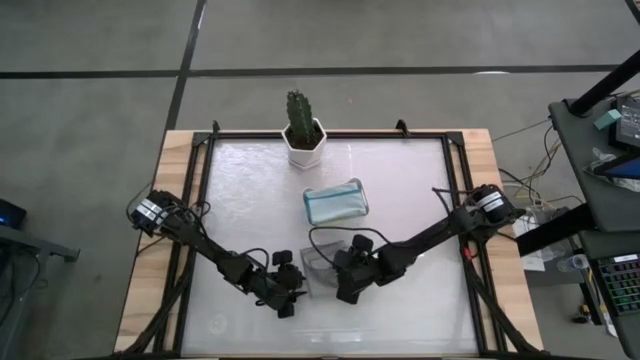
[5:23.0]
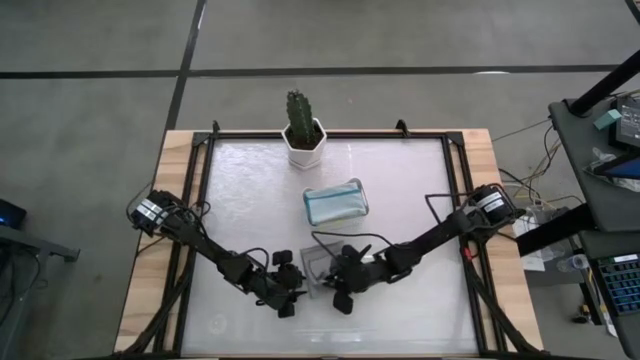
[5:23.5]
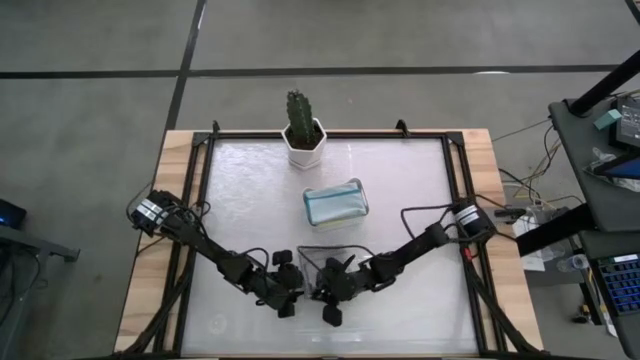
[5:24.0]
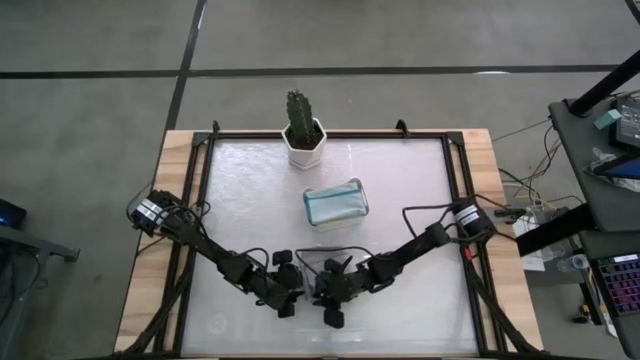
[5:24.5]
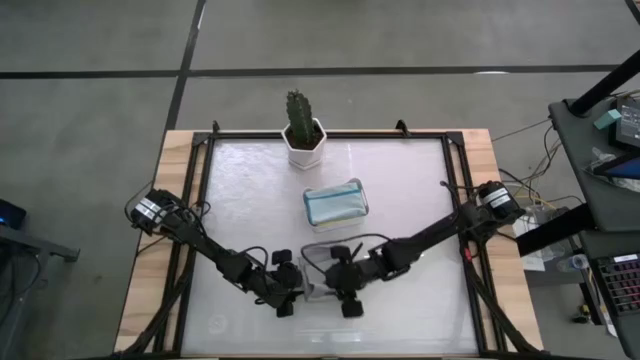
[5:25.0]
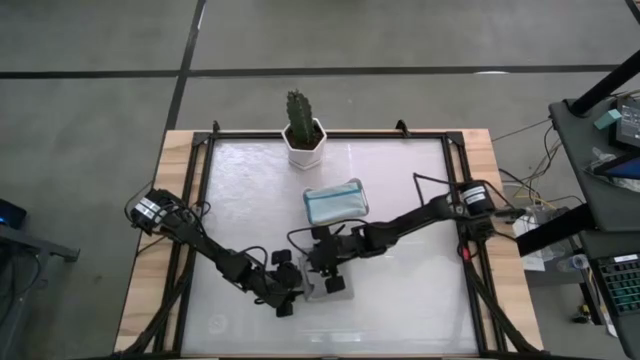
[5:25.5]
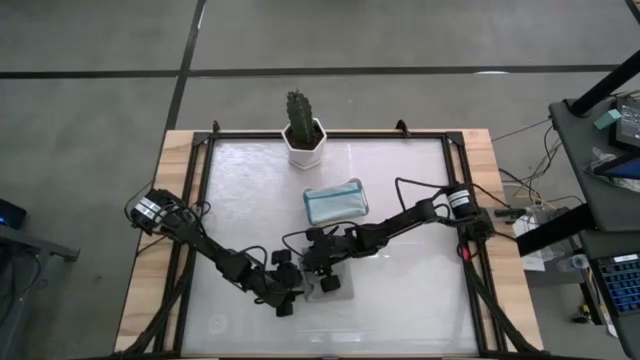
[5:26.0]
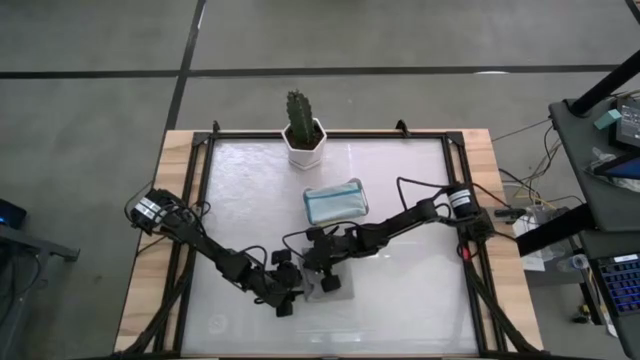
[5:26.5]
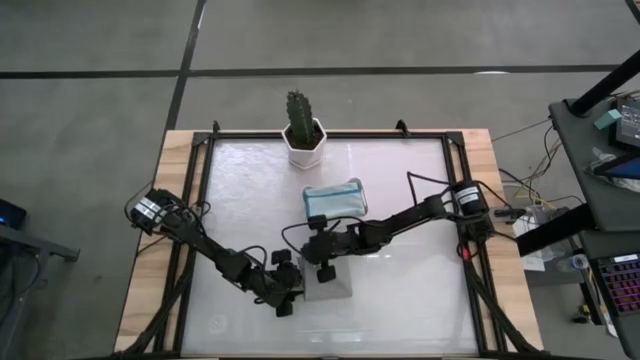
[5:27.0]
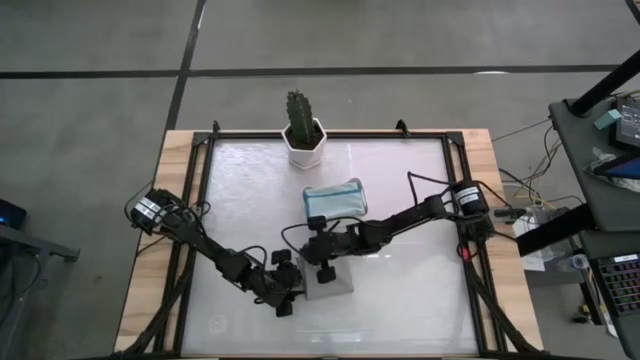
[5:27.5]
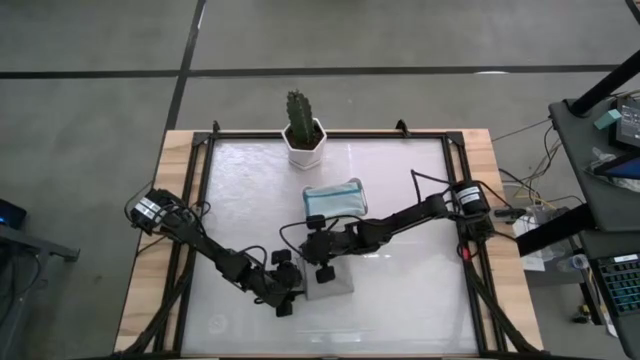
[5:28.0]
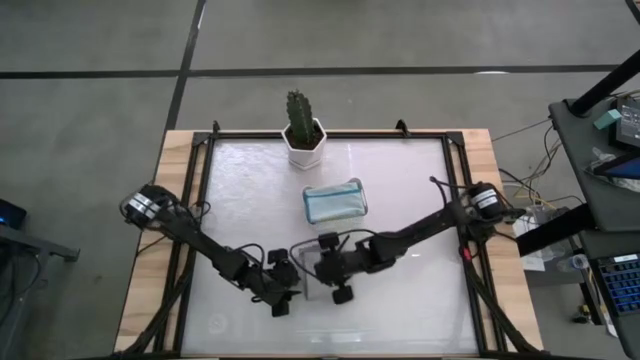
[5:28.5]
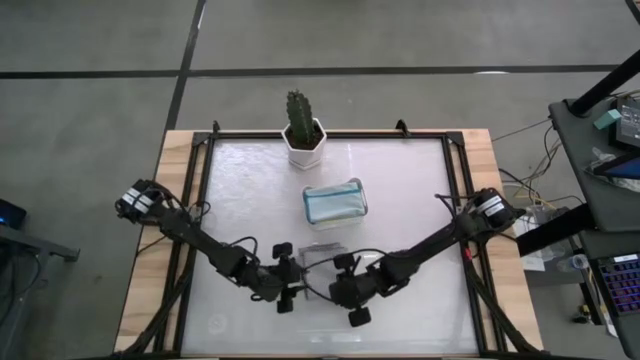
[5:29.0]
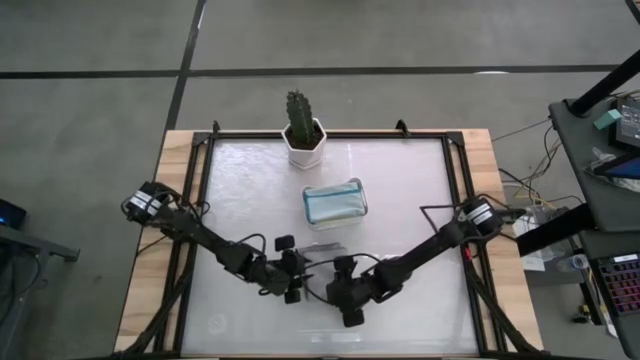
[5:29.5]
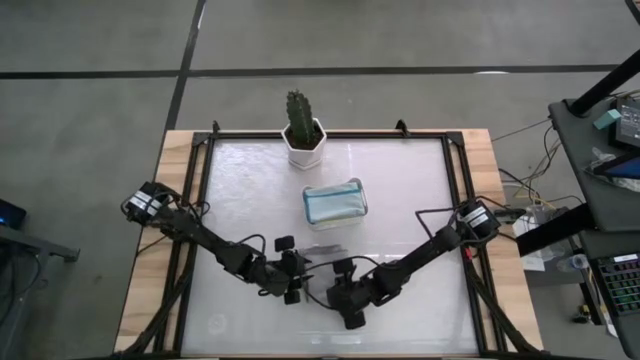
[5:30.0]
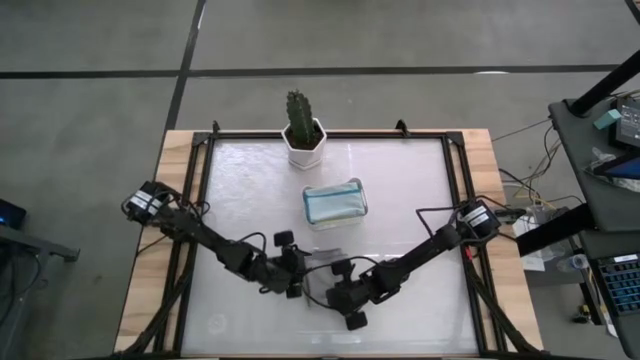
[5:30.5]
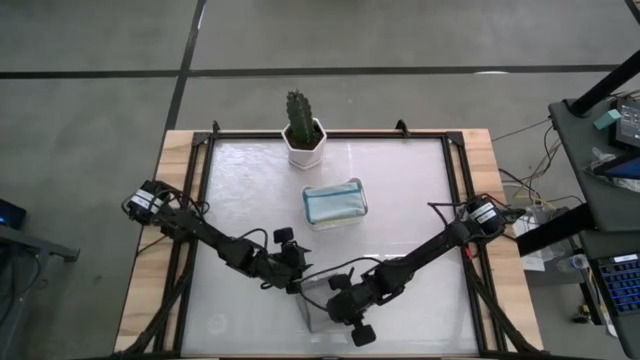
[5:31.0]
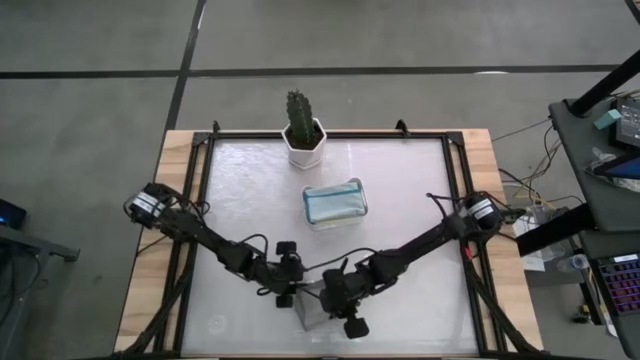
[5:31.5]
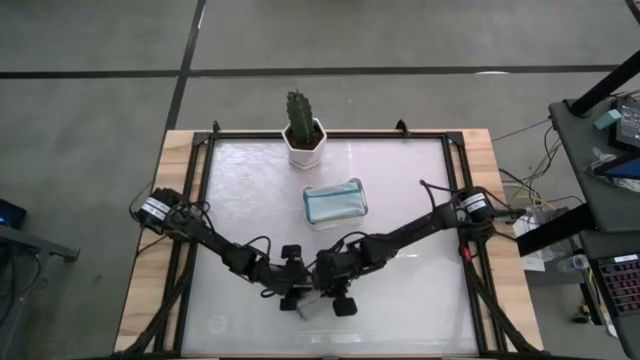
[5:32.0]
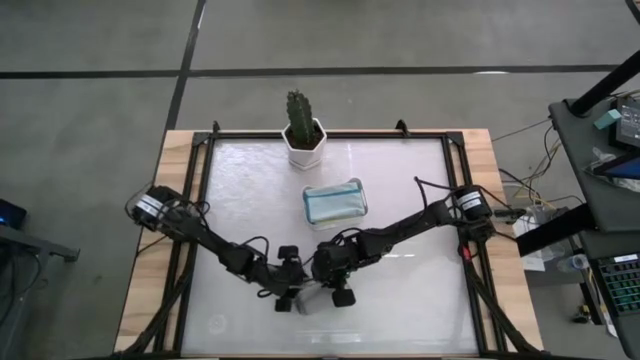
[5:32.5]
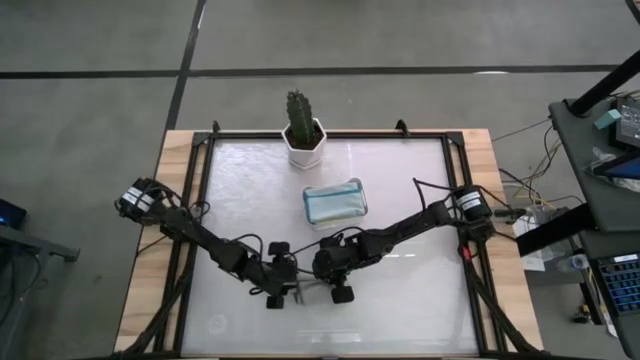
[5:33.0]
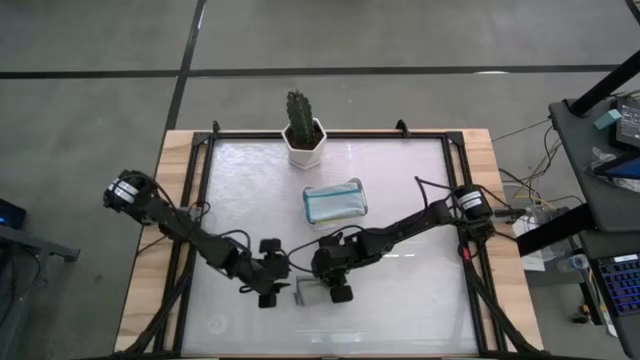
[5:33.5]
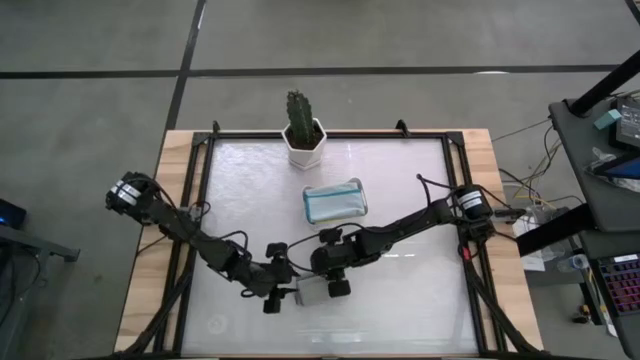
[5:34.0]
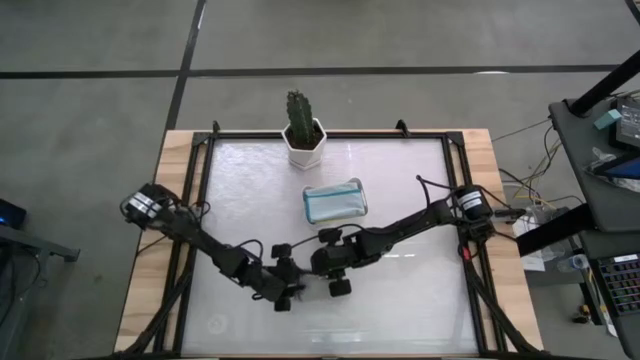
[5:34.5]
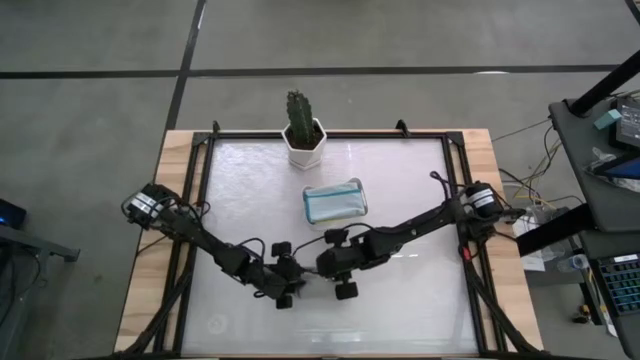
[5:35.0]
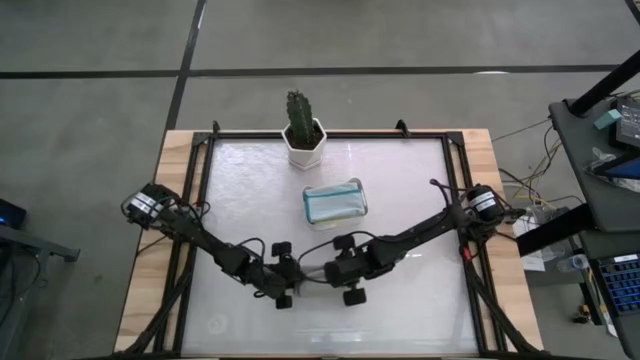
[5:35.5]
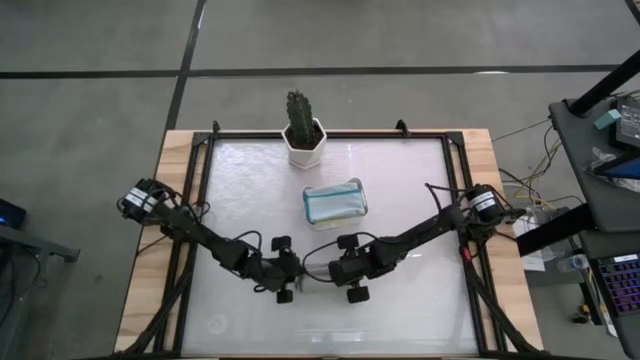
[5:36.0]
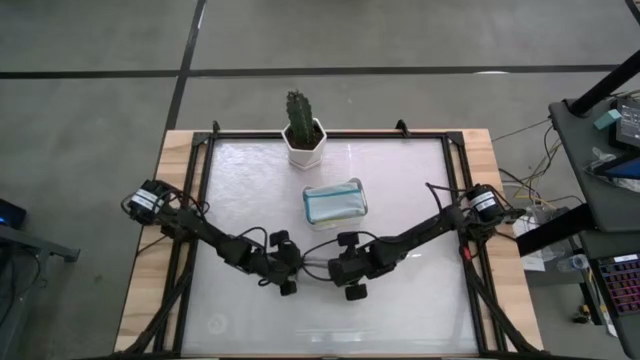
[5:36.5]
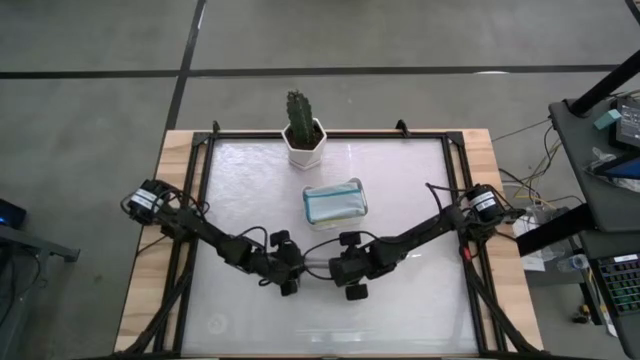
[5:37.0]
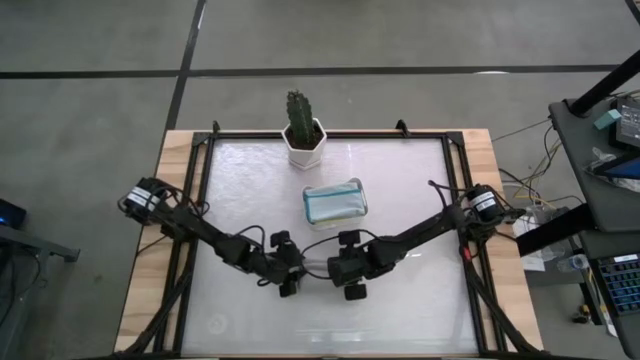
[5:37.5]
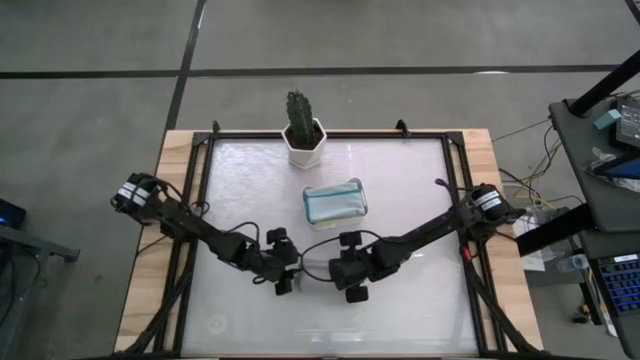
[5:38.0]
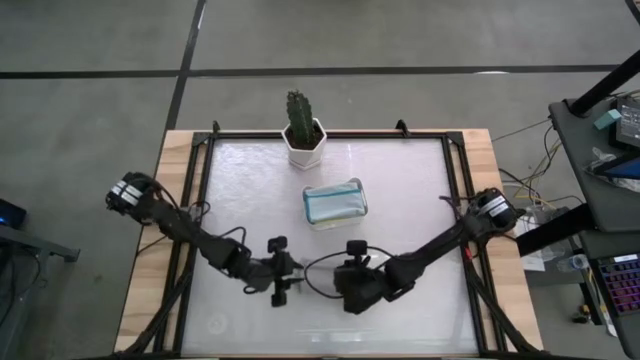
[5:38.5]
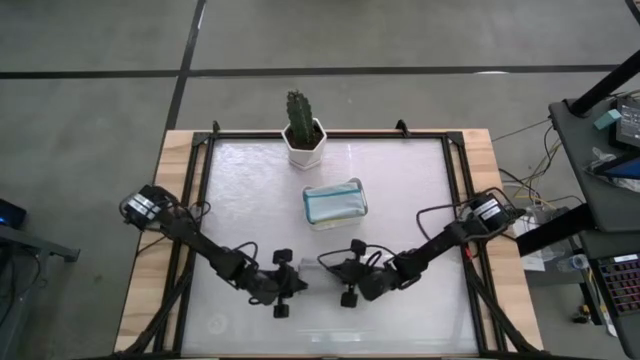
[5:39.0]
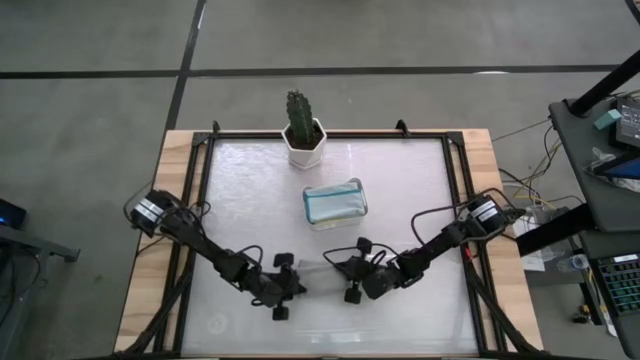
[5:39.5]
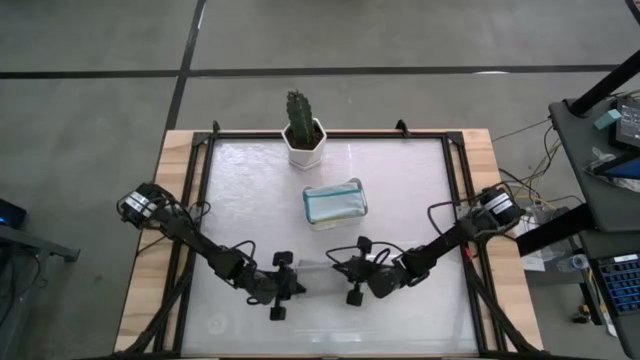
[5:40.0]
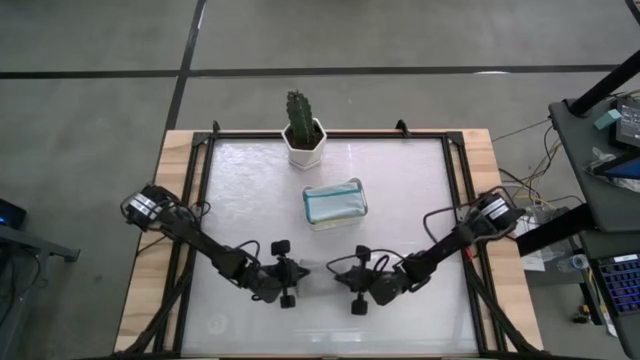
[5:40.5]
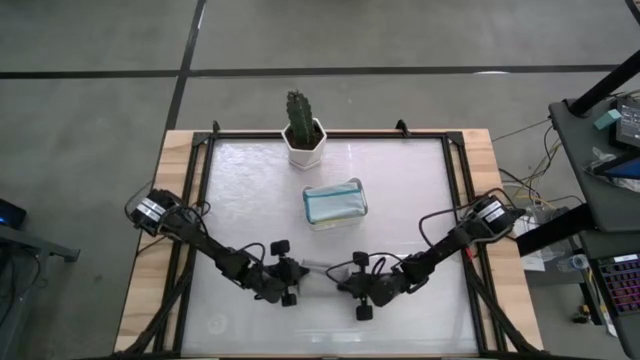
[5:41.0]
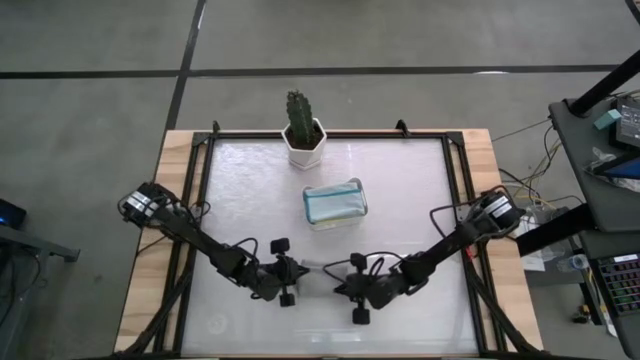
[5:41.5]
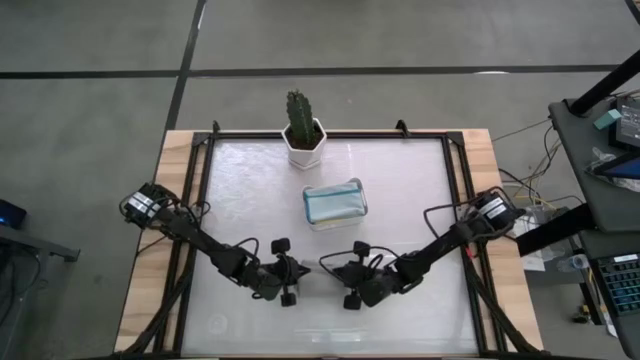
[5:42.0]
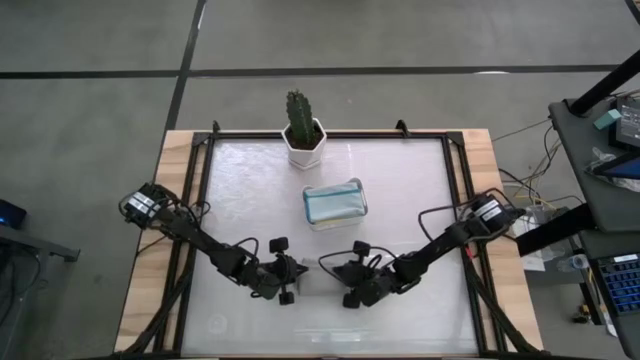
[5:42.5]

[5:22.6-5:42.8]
Task: Fold microfiber towels
Fold the gray towel

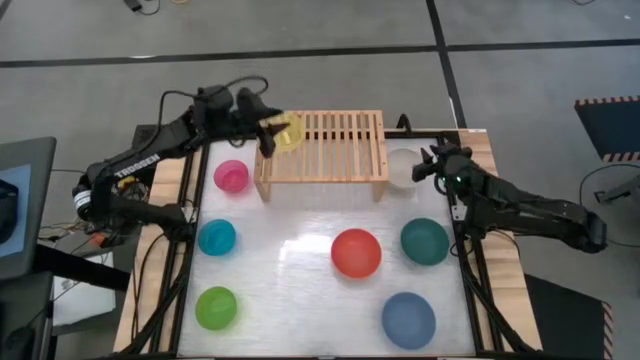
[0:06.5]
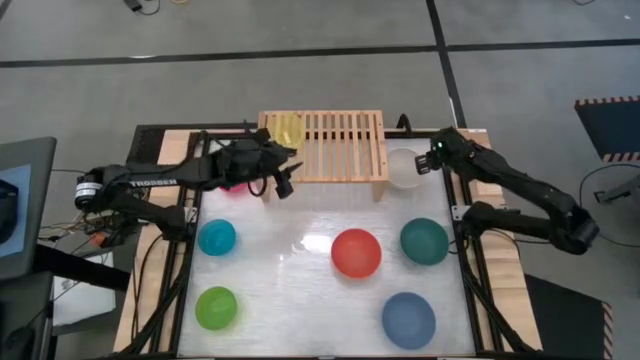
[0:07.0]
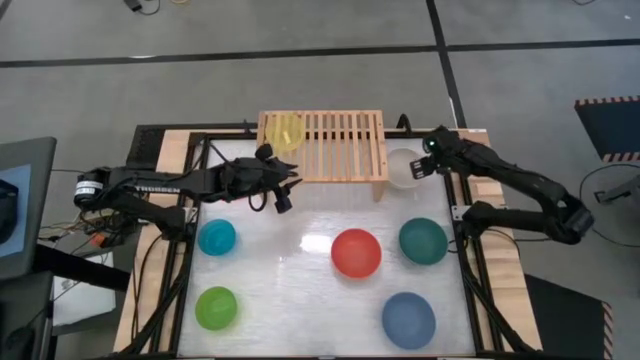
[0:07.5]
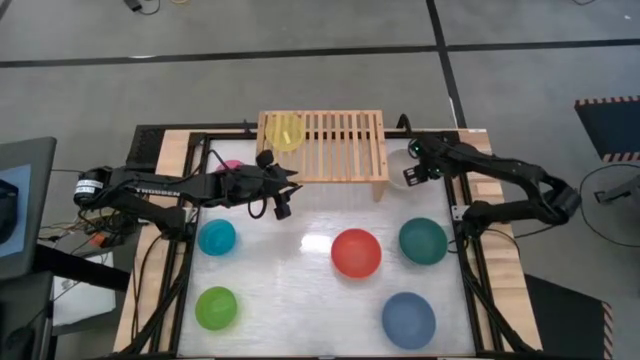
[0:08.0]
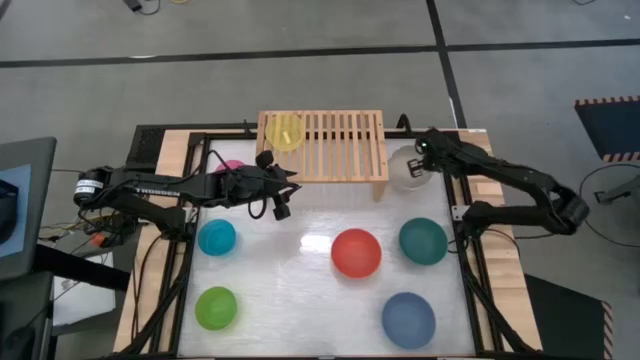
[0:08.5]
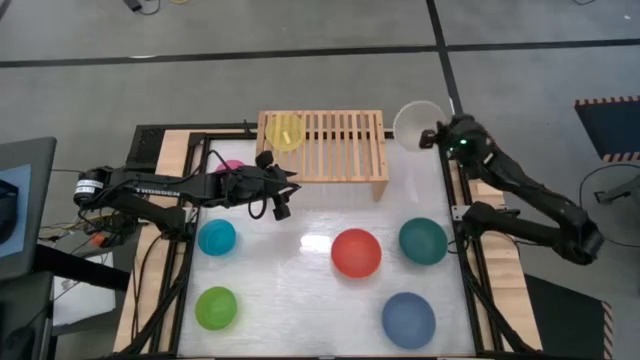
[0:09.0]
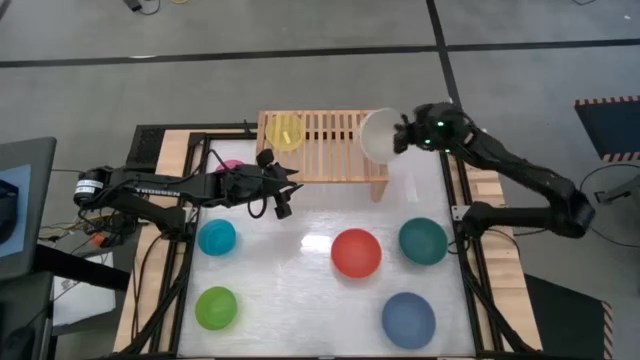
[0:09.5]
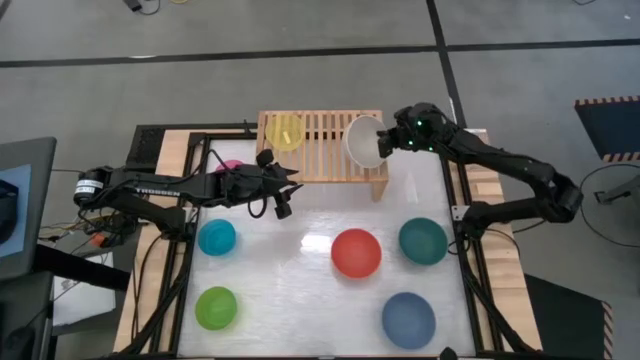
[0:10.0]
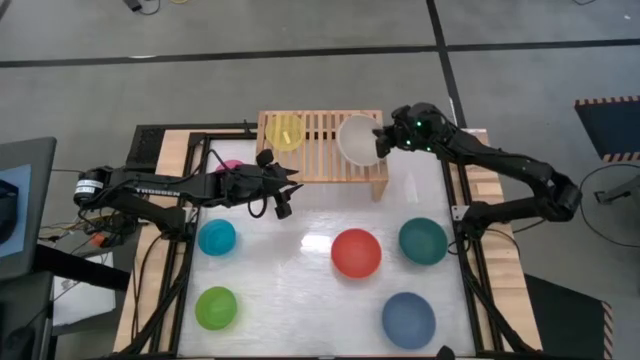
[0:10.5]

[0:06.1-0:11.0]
Task: Place and stack bowls onto a shelf
Put the white bowl on the shelf
